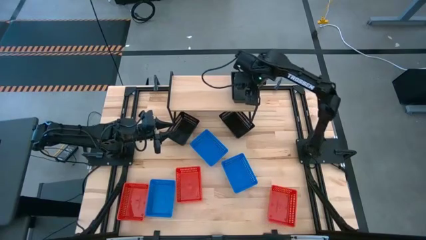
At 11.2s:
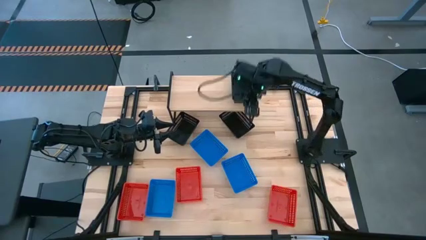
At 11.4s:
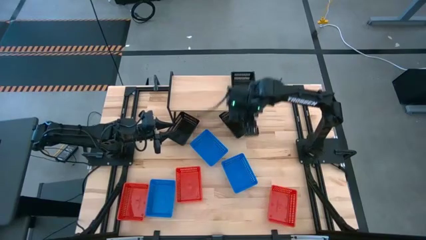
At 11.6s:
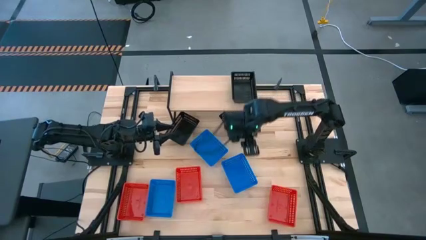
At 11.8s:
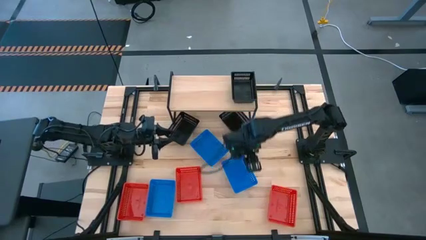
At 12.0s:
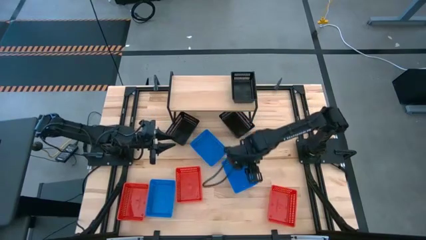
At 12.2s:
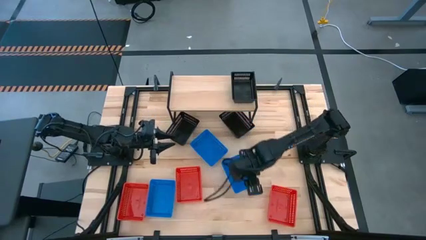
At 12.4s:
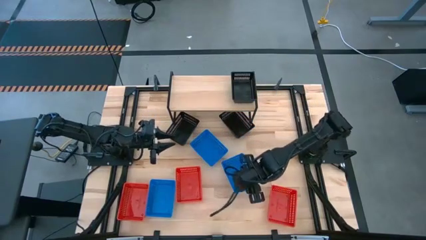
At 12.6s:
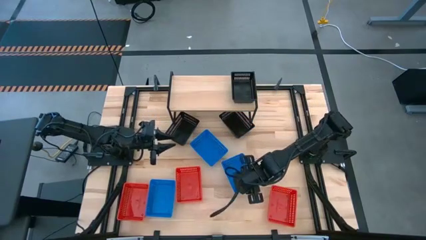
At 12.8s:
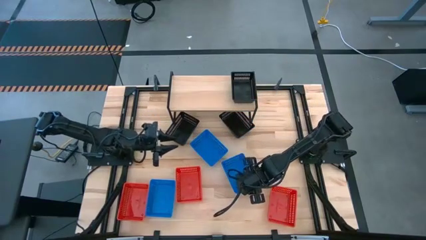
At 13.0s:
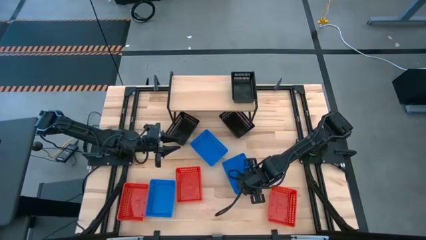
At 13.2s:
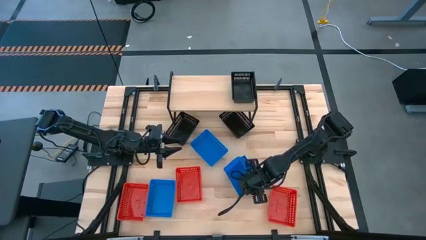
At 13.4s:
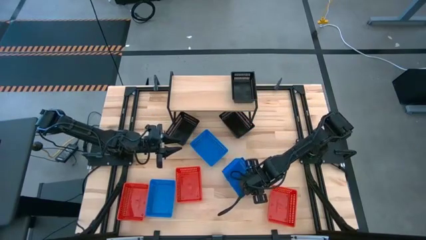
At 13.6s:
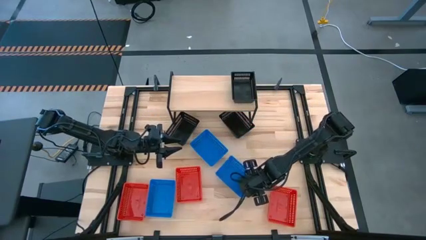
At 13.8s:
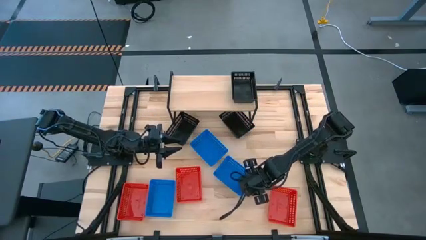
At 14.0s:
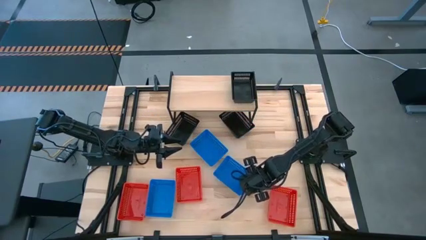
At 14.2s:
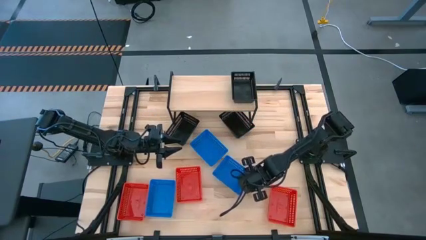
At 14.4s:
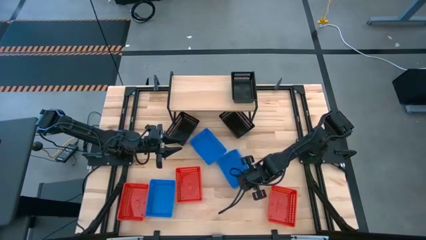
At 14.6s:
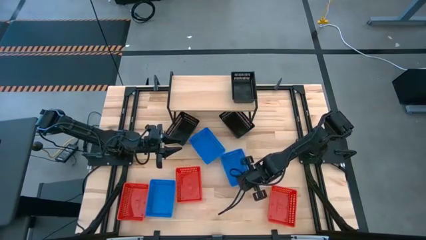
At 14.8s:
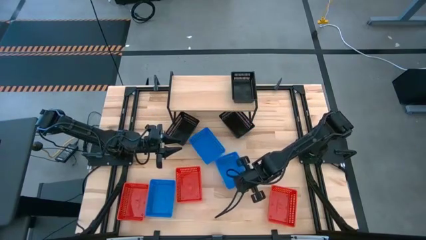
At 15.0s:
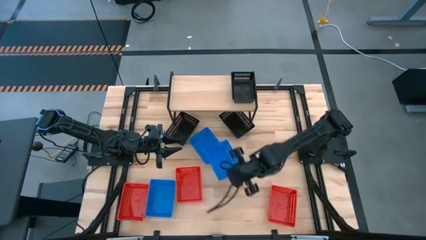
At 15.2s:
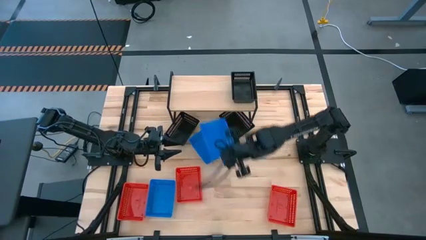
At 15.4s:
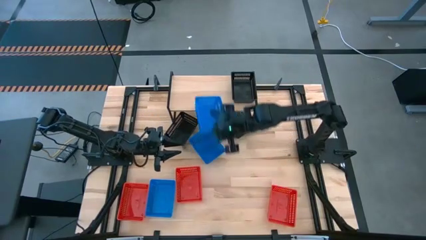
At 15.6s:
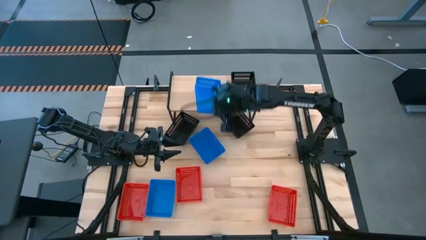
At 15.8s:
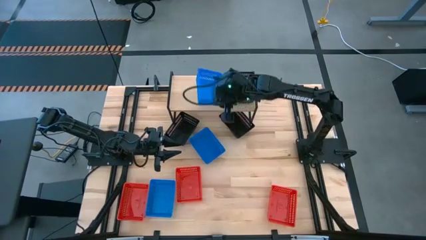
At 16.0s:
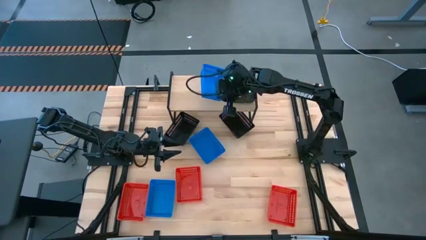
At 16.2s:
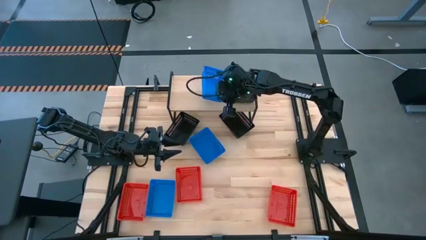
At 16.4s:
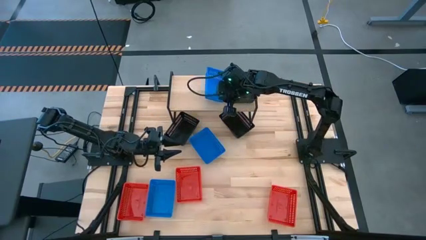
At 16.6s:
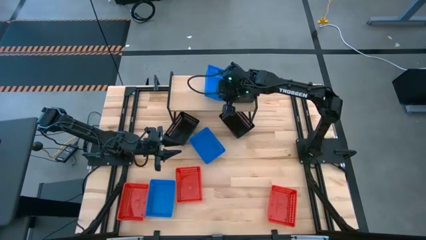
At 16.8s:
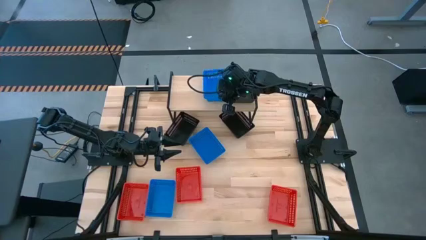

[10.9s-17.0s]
Task: Stack baskets on shelf by color
Put the bottom right blue bin on the shelf

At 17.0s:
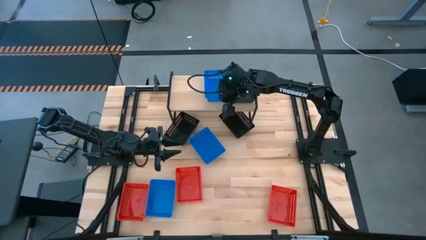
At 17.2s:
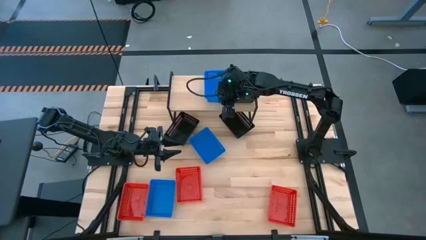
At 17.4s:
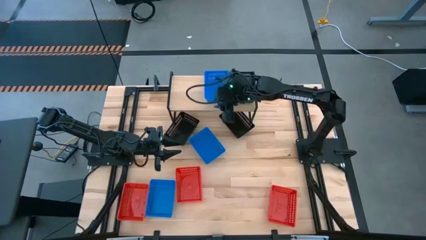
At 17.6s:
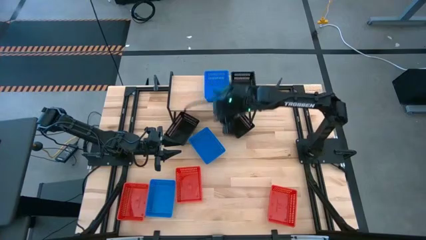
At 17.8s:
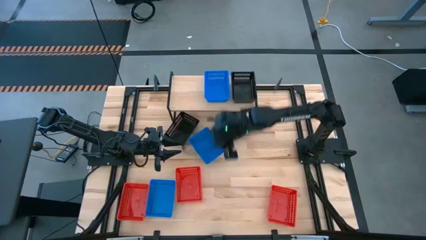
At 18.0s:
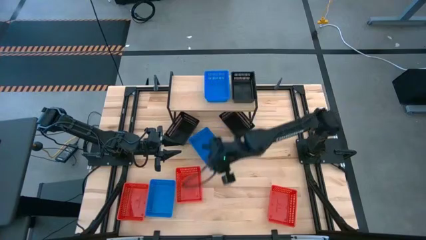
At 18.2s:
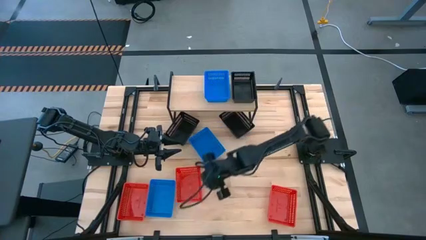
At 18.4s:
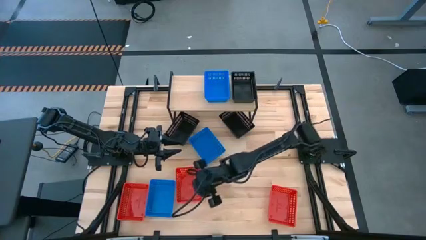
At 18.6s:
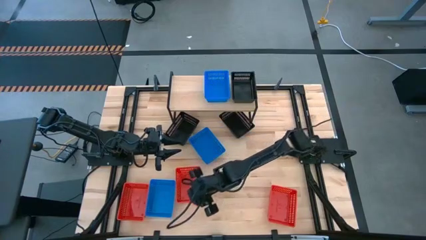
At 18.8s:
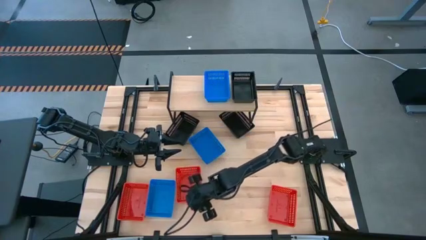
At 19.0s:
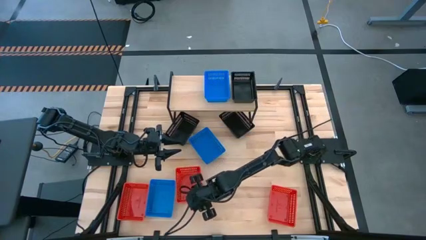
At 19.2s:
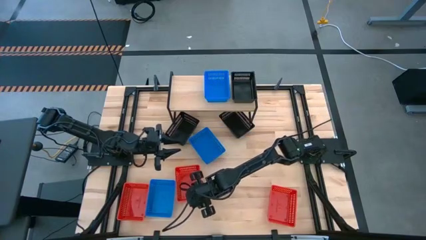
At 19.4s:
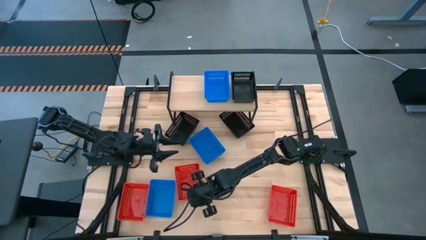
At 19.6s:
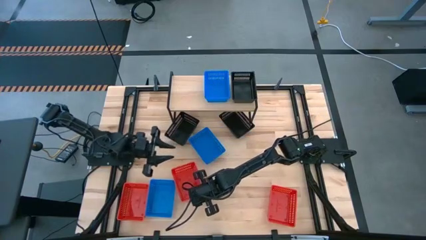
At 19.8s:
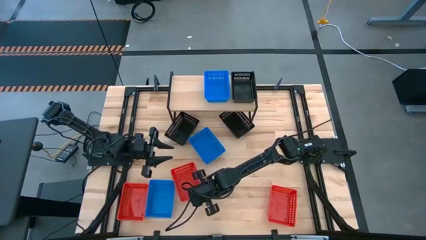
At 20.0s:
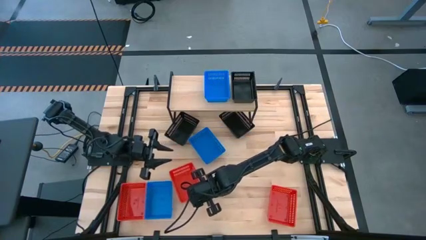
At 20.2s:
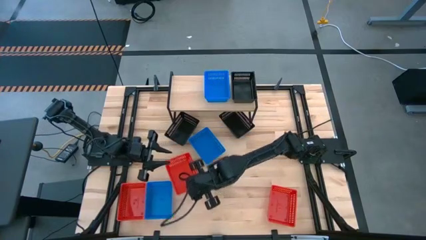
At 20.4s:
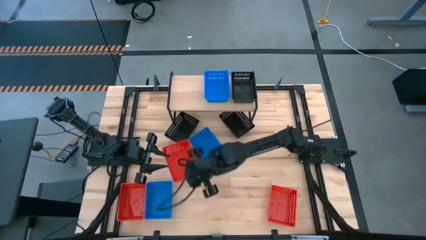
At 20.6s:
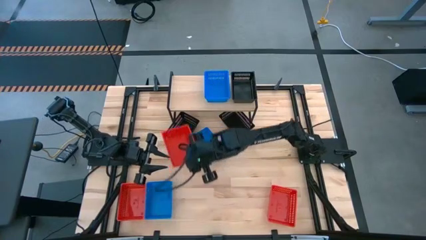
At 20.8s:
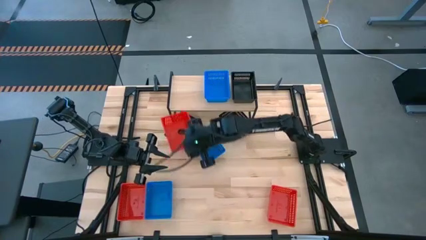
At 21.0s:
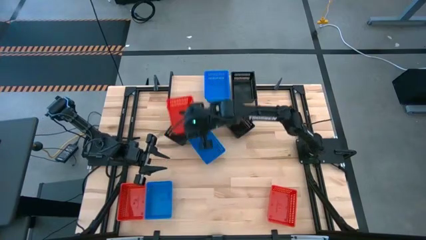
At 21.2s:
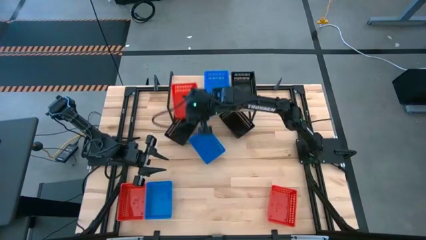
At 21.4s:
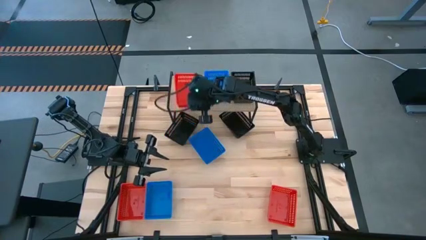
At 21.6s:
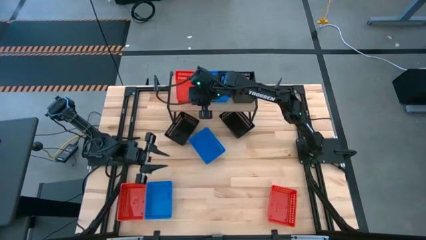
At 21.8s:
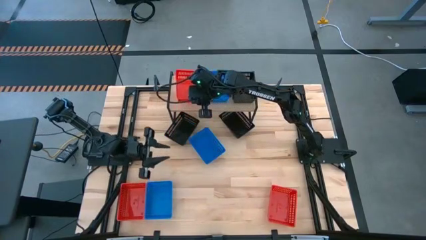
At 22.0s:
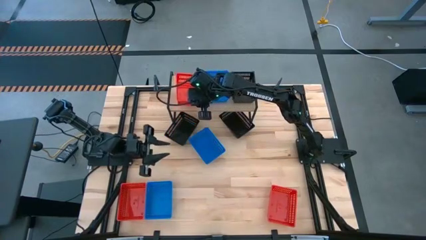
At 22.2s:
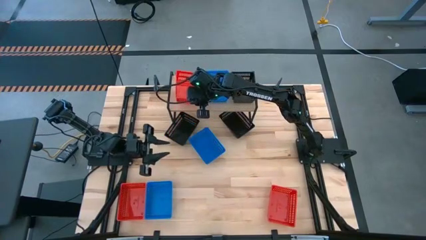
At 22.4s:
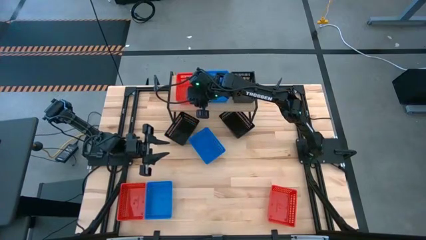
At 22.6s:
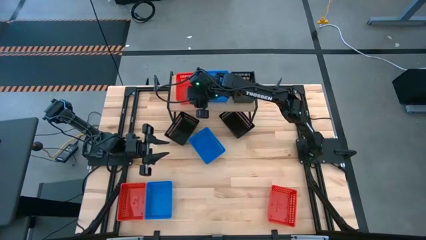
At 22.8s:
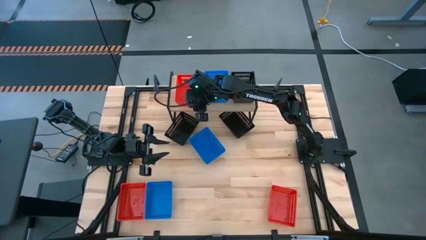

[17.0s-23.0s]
Put the middle red bin on the shelf

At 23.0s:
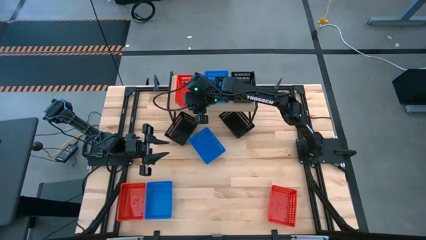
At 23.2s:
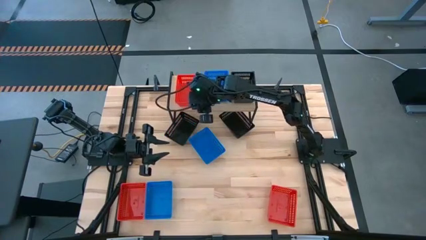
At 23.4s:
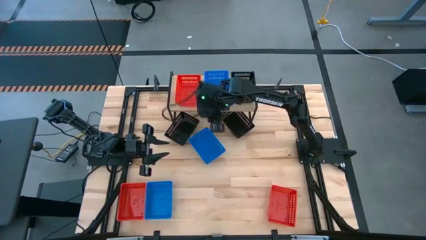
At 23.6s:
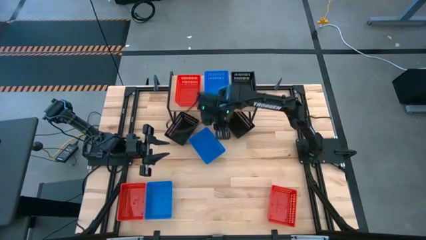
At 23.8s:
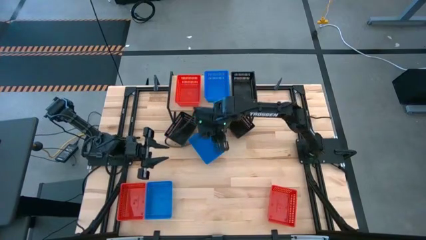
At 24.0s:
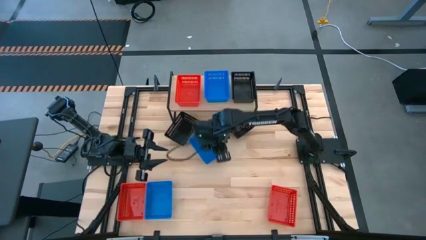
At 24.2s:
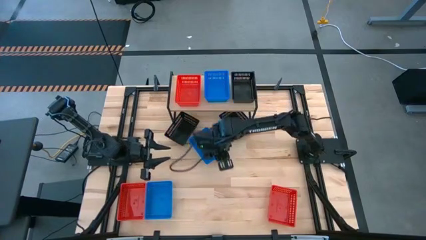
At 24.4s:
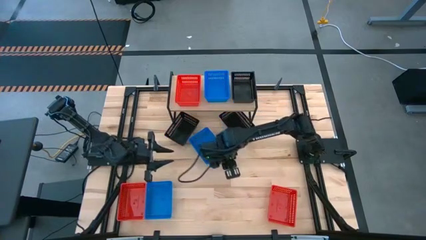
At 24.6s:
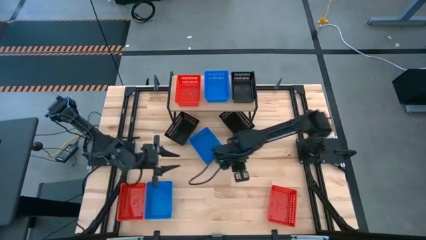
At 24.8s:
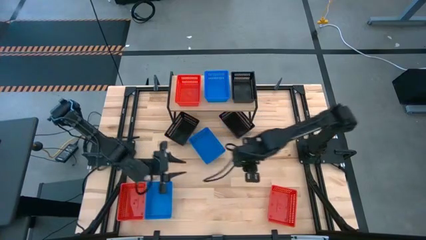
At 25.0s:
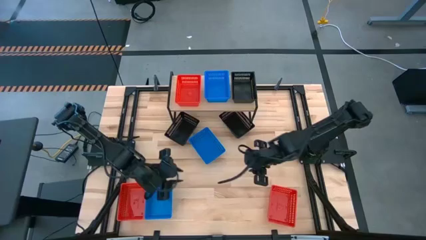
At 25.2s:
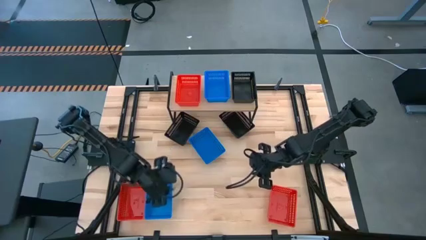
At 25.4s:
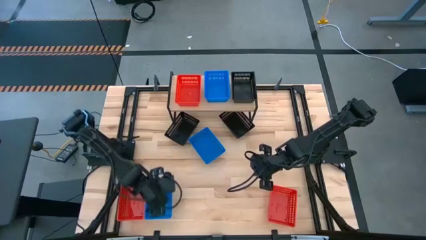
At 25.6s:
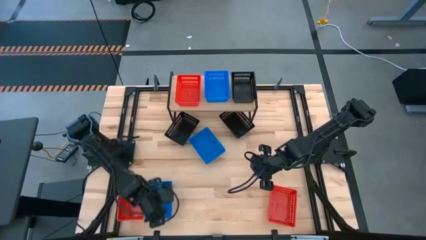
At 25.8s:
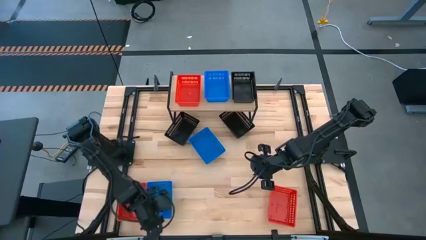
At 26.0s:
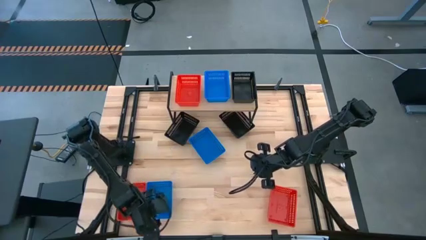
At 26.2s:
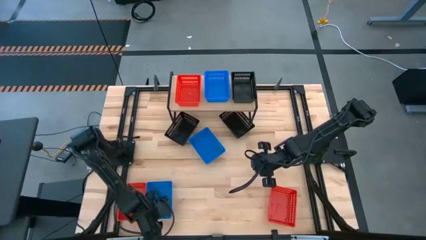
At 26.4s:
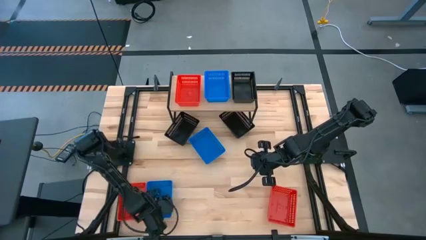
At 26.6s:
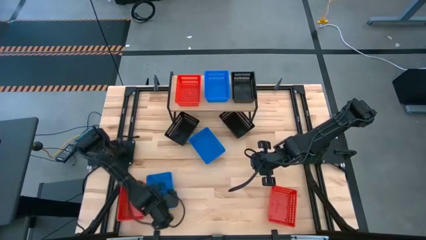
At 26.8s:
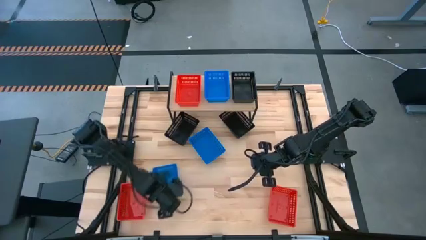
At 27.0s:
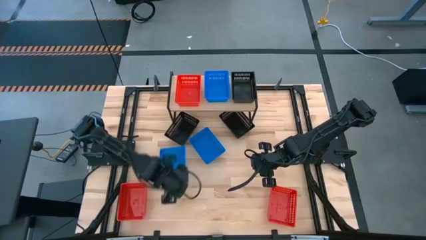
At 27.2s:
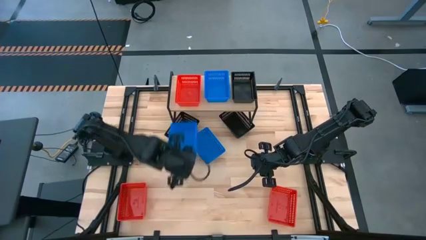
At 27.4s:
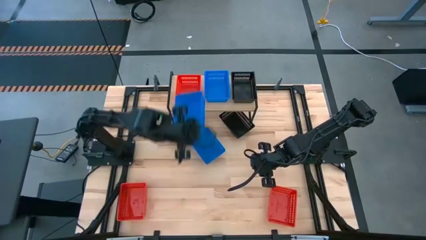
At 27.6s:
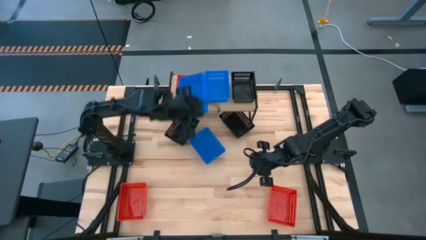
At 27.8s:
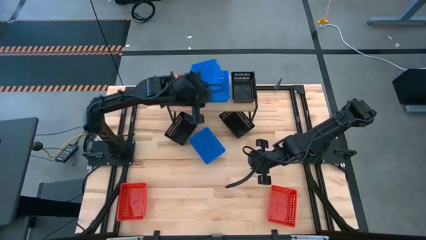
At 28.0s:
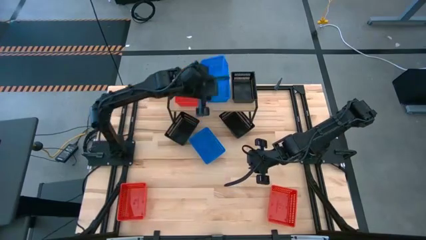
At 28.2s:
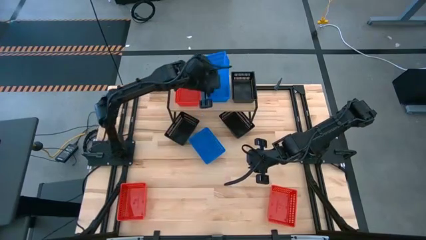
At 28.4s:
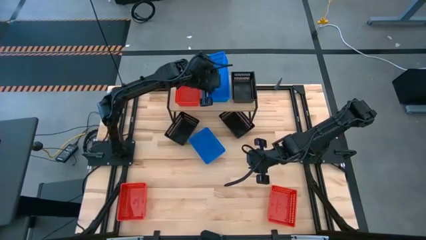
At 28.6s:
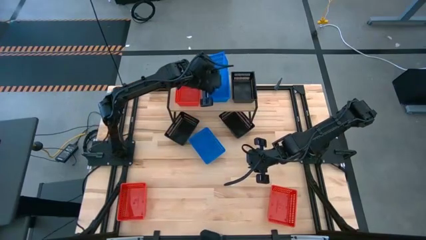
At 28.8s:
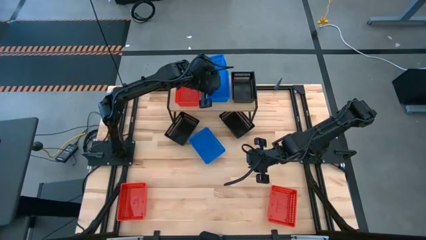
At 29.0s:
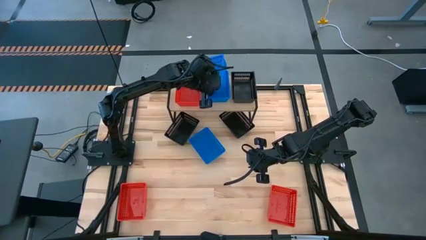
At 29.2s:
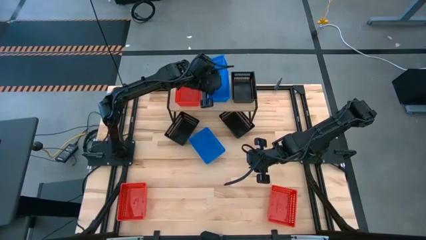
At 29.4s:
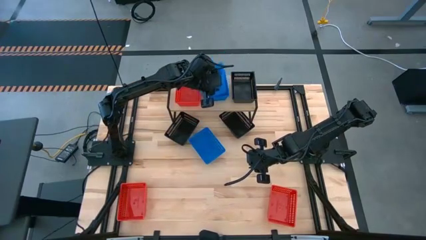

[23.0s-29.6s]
Stack the bottom blue bin on top of the blue bin on the shelf
